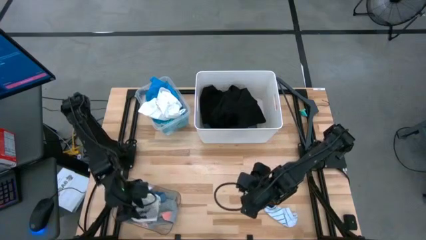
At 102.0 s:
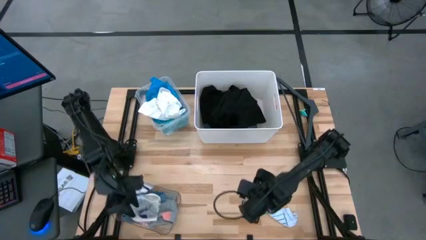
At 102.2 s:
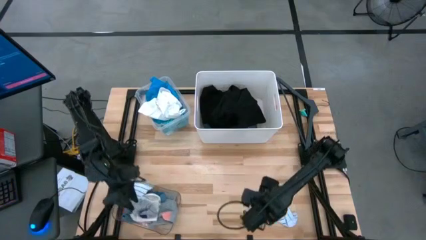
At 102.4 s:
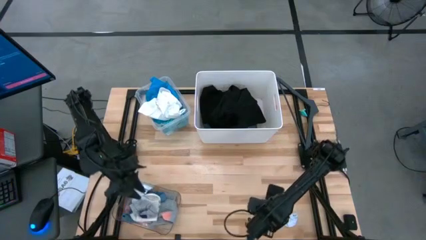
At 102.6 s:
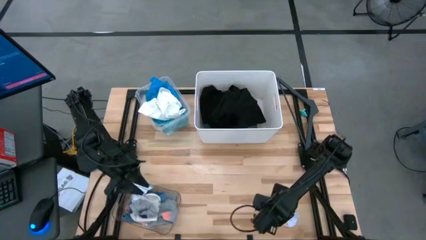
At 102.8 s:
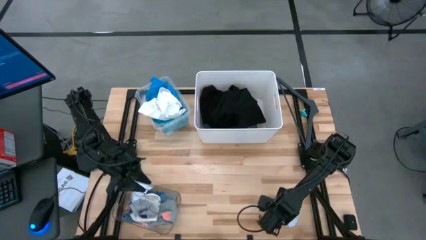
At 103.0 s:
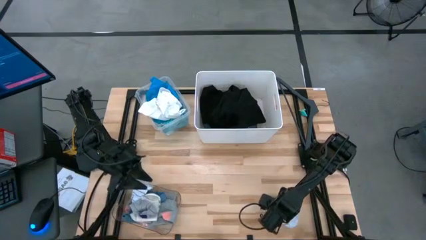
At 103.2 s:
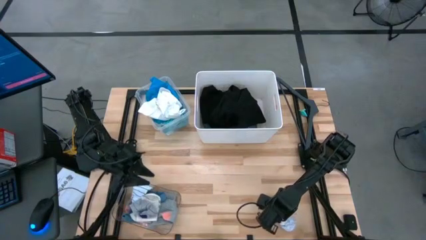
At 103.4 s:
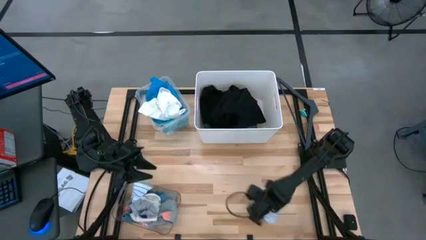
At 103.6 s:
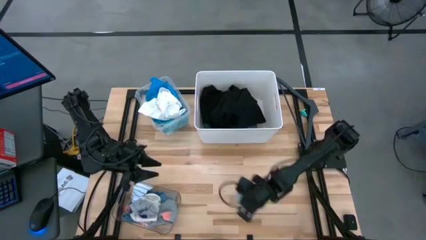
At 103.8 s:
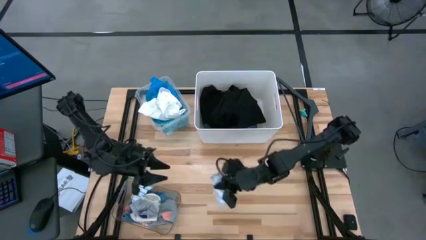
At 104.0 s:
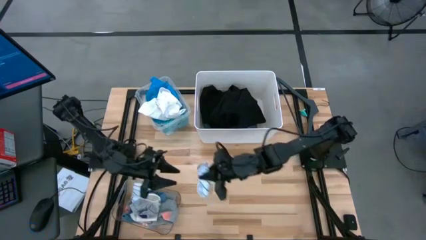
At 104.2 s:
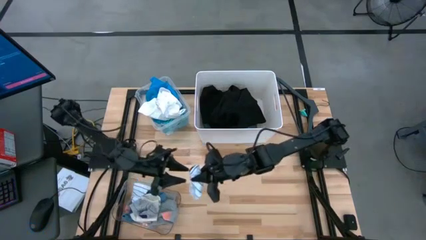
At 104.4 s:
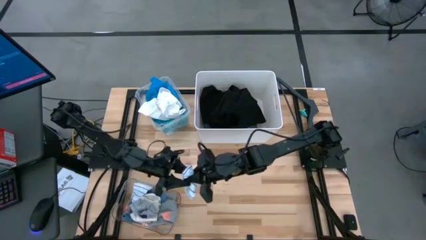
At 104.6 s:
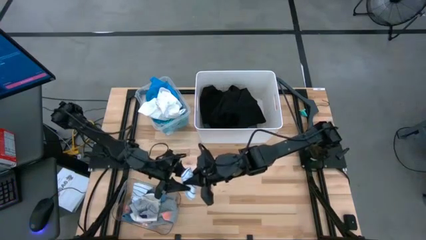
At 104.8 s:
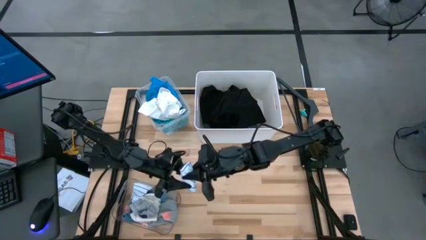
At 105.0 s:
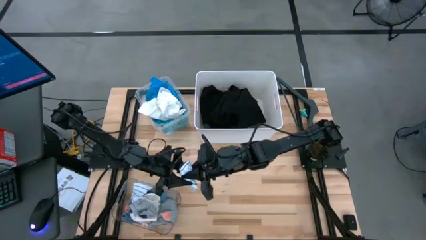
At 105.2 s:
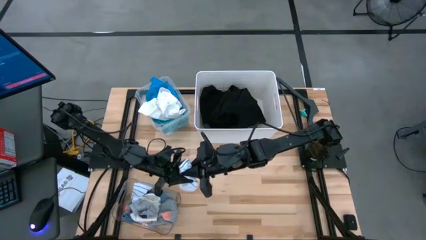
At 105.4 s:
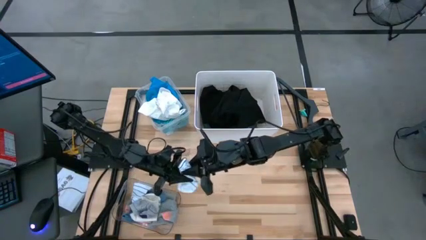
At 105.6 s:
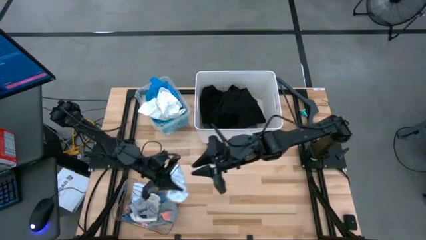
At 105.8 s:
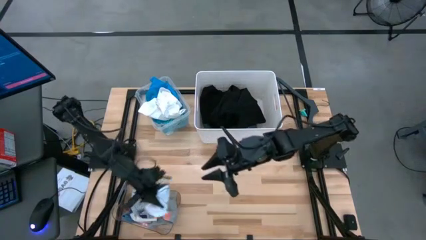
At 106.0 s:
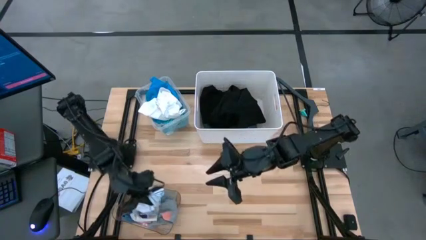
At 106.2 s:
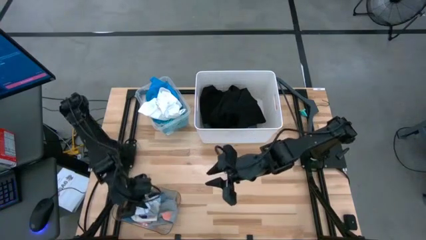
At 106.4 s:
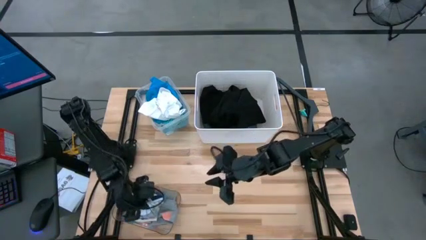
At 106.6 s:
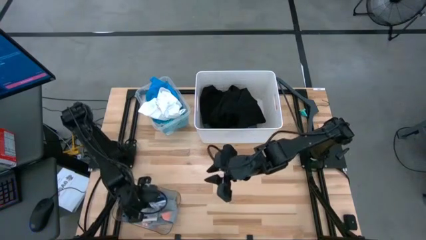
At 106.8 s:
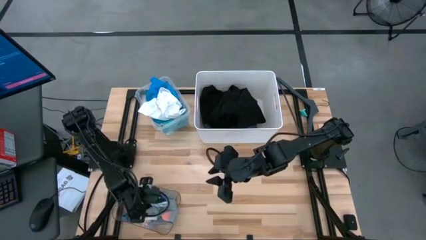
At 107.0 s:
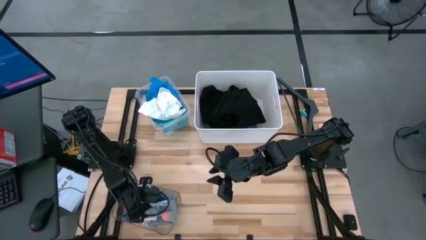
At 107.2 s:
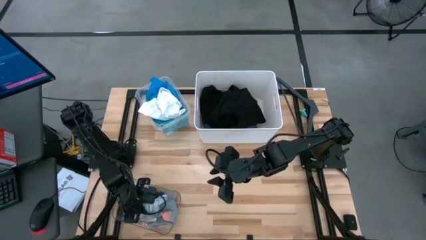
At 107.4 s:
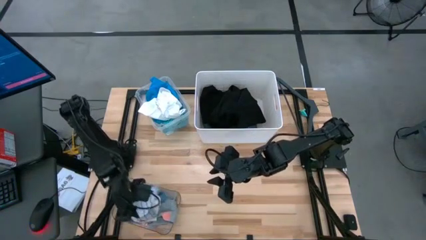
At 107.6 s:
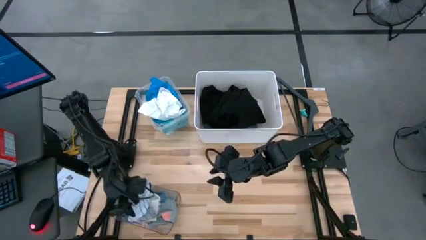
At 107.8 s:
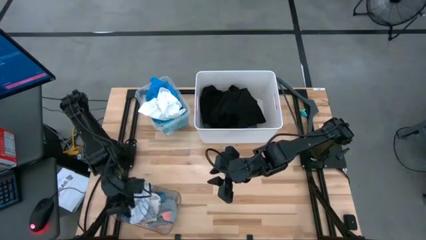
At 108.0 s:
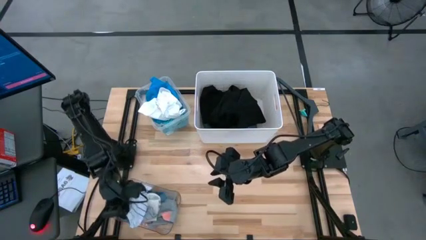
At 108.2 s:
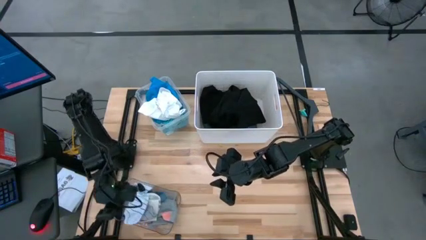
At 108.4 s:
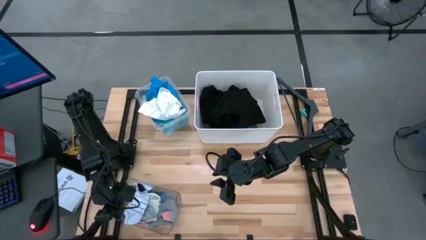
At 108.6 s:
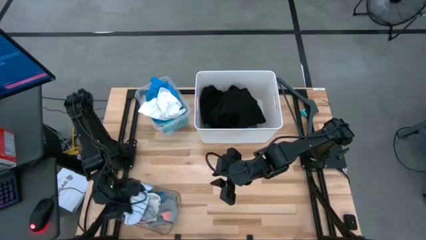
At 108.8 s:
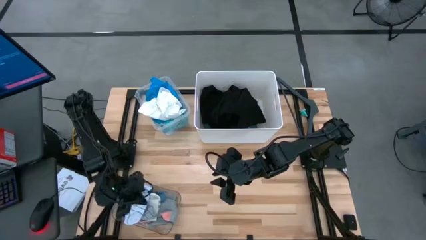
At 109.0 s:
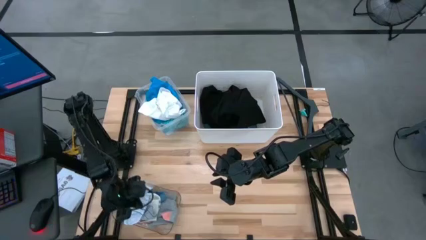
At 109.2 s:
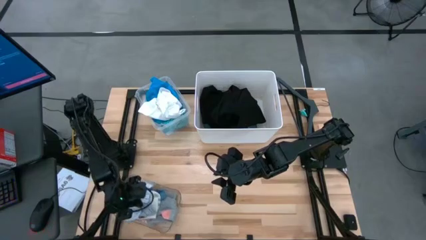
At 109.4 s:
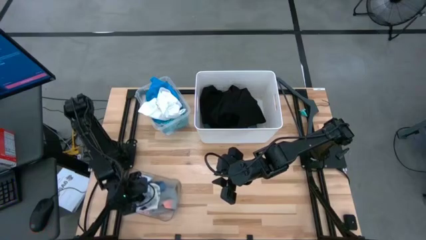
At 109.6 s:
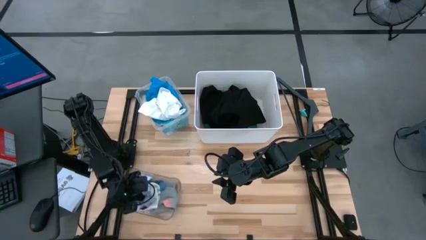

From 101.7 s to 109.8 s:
Task: Pick & Place Cloths
Put the white sock into the transparent bin

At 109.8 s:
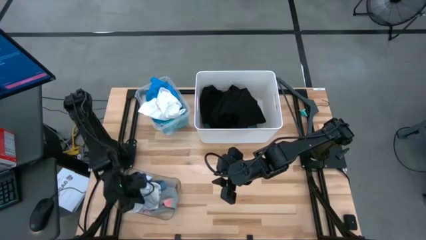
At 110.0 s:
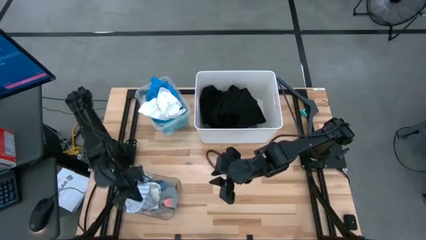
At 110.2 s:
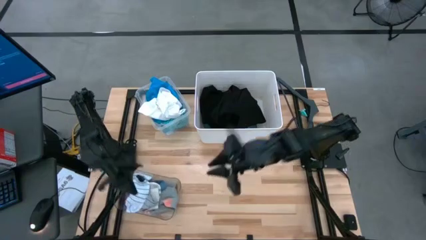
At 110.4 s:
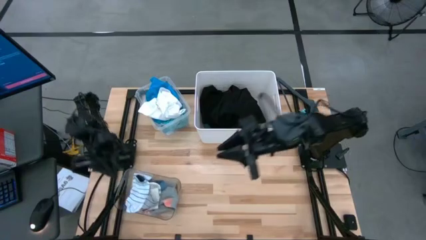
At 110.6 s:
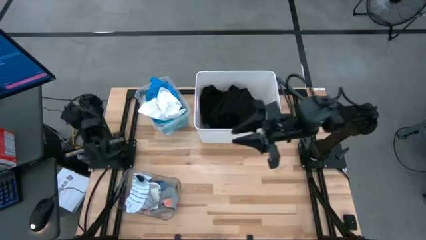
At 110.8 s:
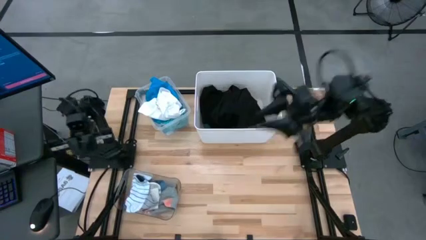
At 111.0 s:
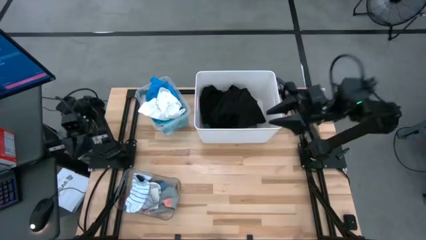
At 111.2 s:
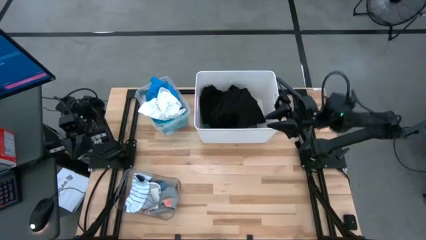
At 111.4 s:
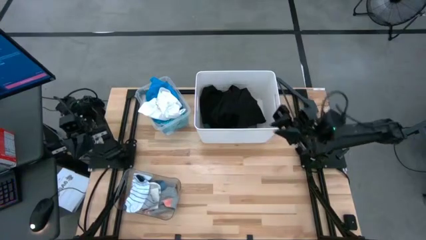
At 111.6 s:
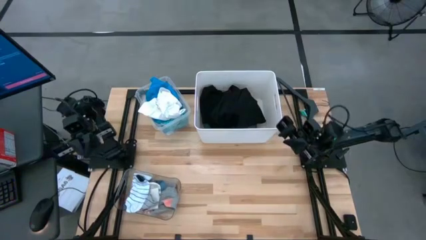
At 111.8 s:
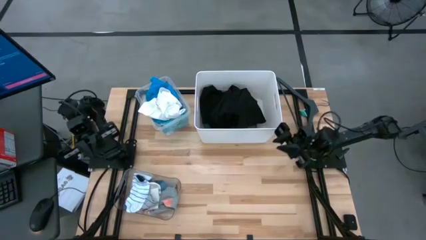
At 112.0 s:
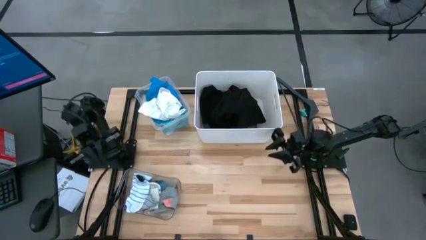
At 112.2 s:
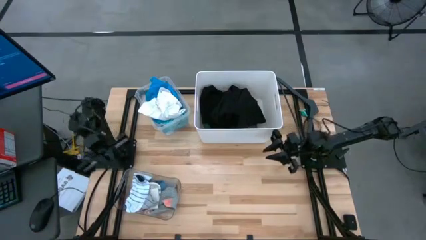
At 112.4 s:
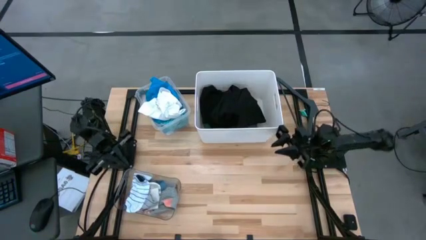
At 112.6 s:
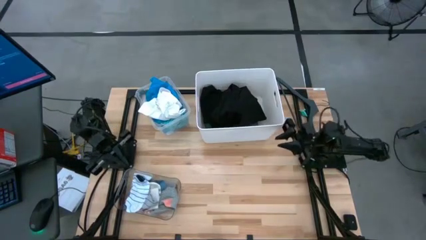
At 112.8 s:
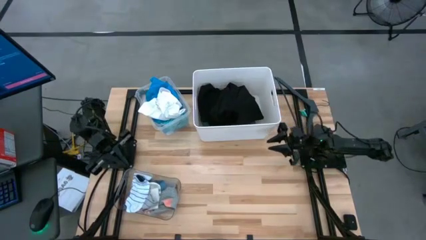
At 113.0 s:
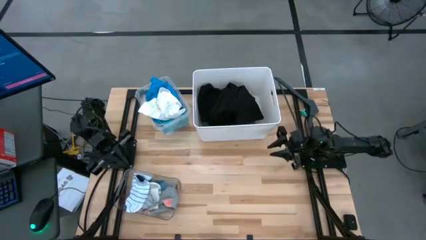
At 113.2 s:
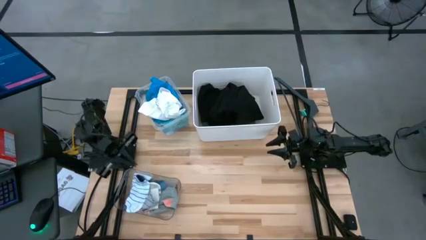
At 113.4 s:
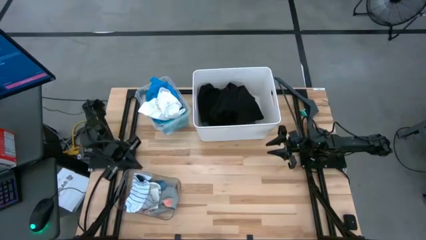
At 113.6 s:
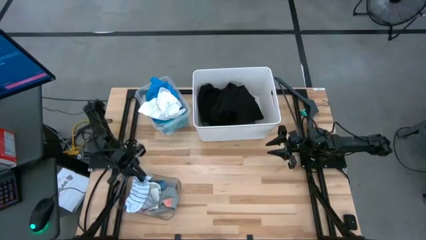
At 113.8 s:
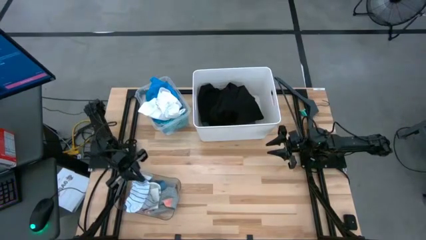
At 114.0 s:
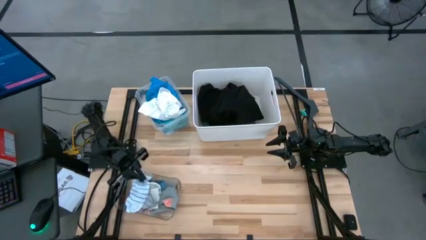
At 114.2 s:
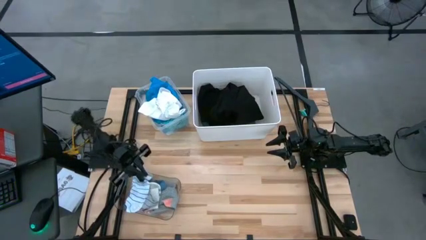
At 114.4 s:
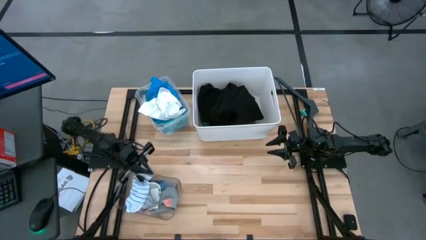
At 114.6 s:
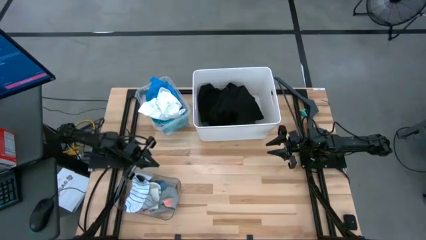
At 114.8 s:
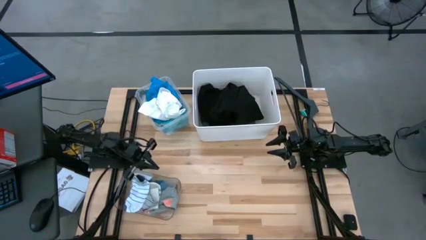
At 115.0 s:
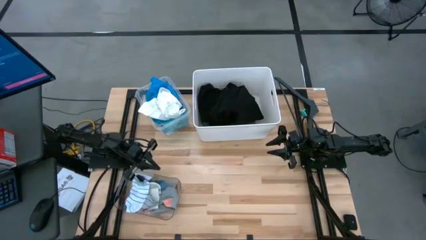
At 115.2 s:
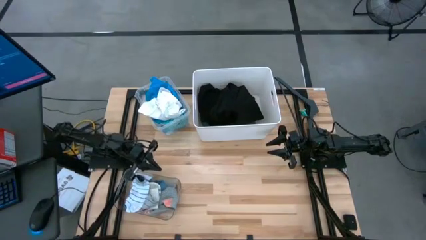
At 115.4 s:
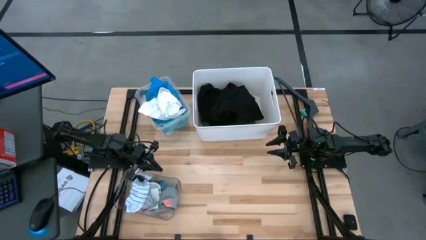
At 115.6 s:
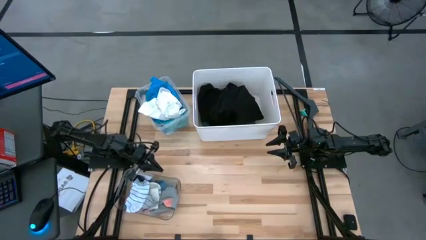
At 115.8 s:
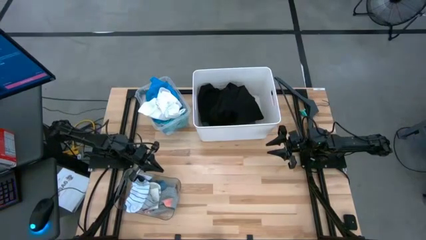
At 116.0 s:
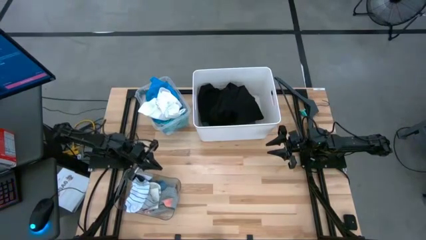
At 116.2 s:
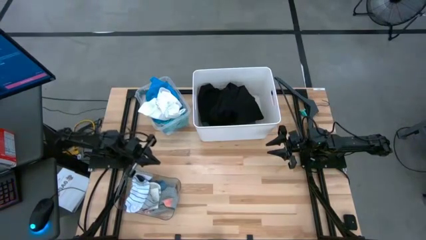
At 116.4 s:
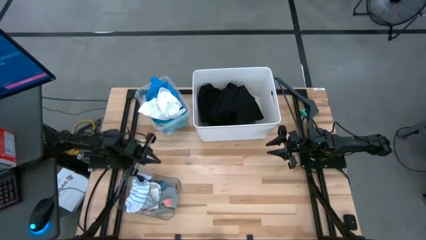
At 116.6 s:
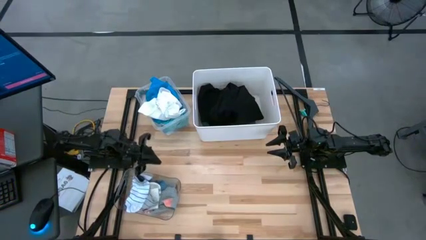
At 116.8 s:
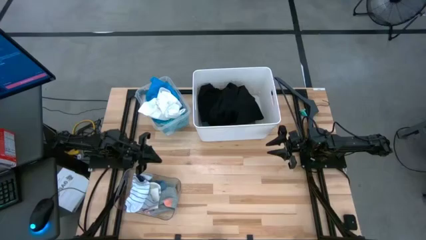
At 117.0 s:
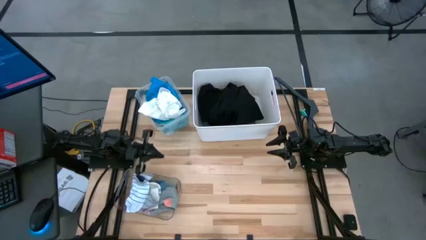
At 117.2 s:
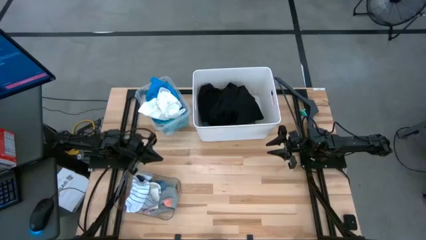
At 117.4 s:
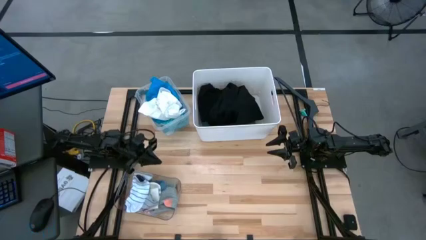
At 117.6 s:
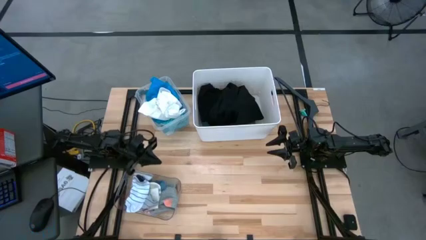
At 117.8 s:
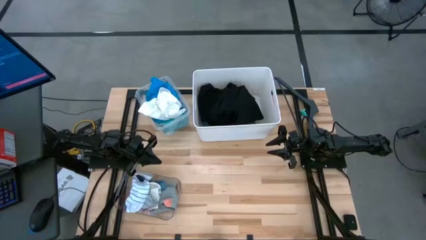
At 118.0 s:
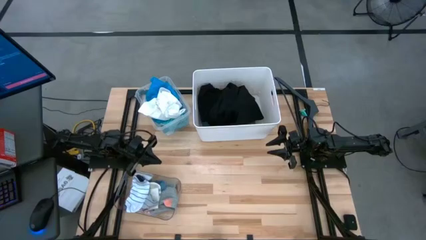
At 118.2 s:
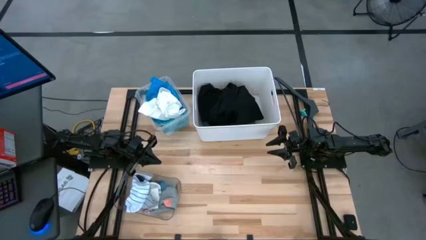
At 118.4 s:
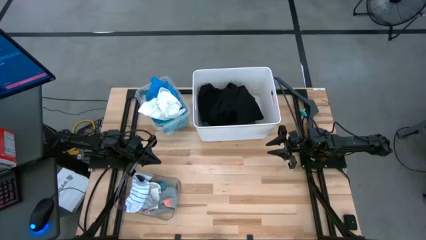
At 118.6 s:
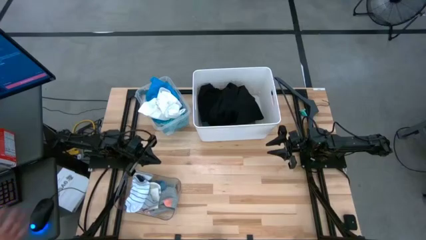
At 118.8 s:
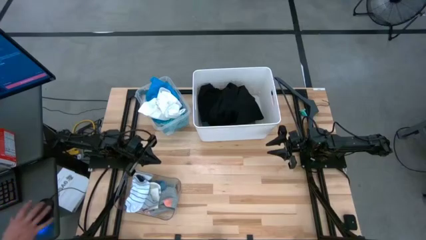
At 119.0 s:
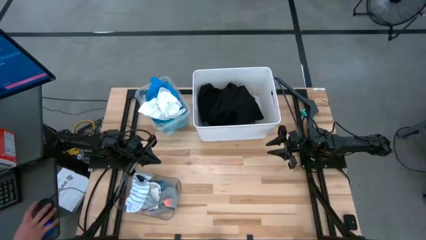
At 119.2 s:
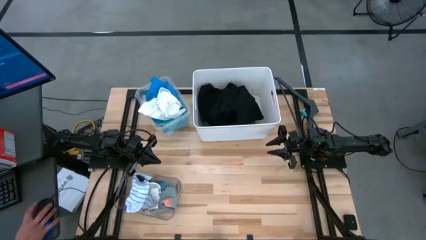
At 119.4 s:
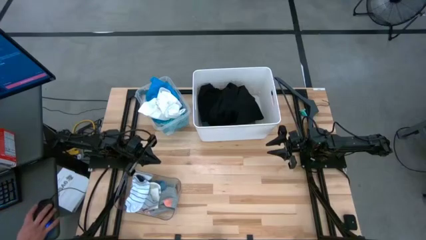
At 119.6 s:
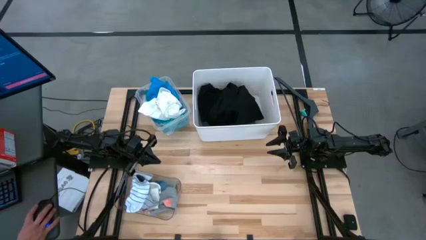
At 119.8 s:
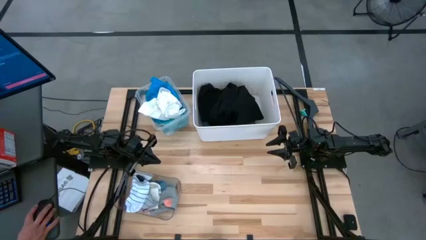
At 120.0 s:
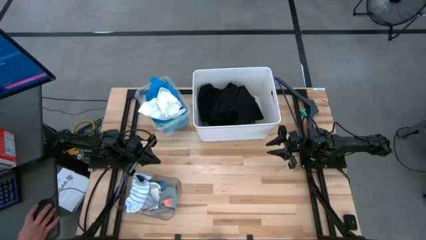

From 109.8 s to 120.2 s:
Return to Home Position
